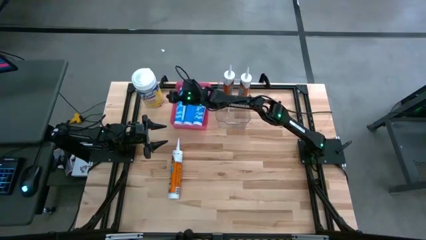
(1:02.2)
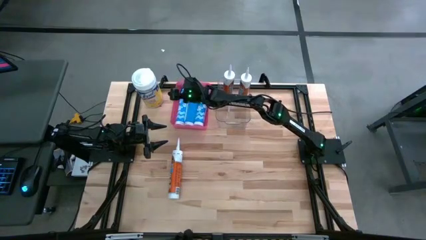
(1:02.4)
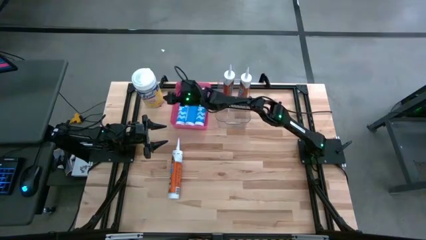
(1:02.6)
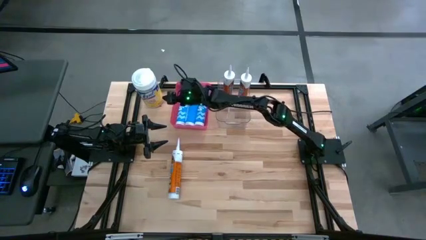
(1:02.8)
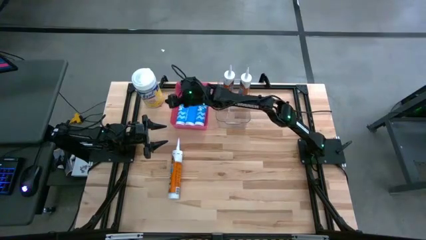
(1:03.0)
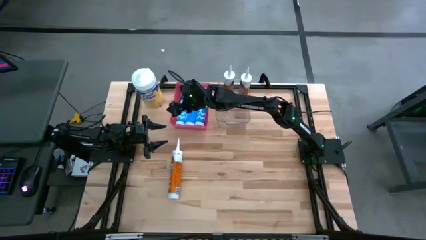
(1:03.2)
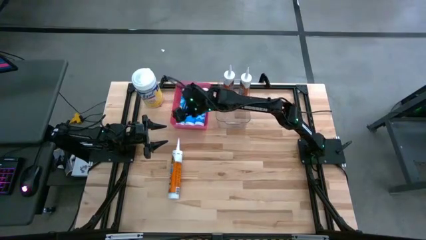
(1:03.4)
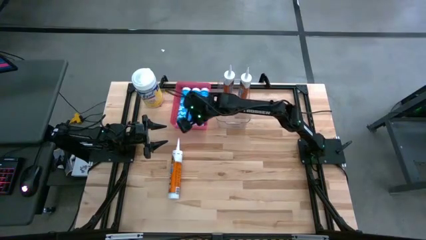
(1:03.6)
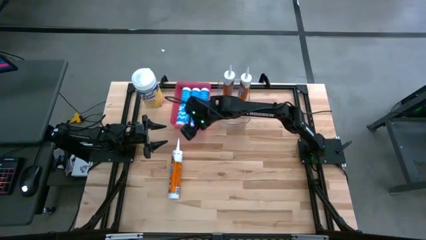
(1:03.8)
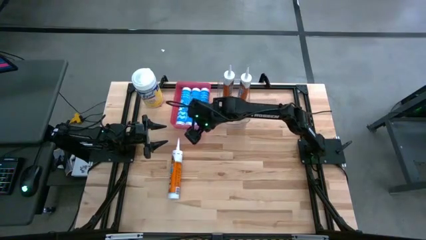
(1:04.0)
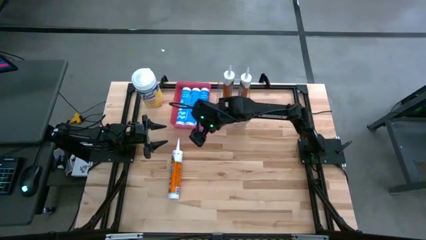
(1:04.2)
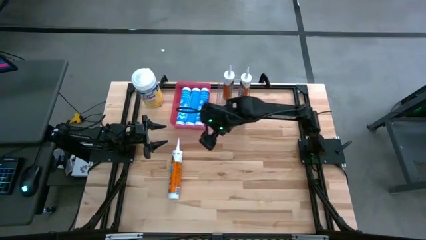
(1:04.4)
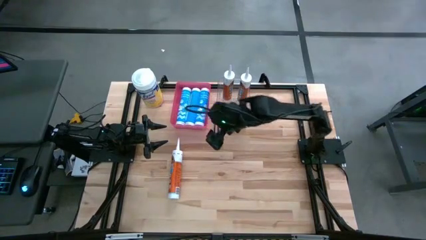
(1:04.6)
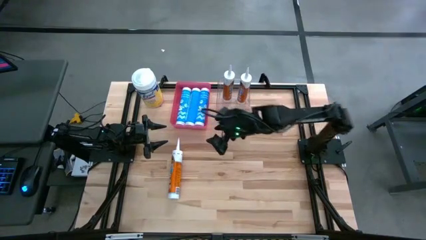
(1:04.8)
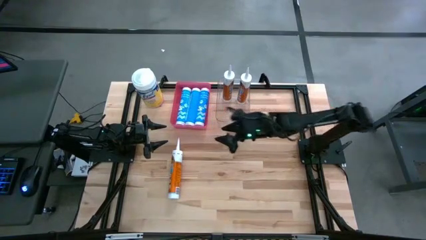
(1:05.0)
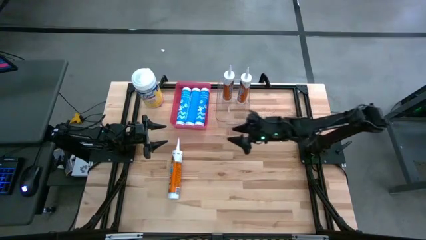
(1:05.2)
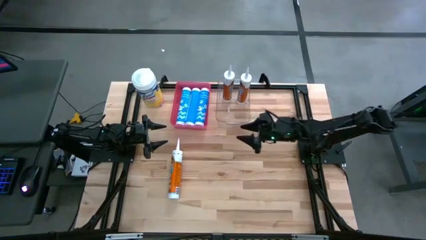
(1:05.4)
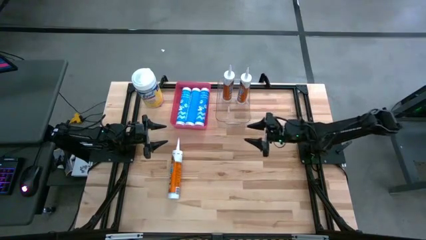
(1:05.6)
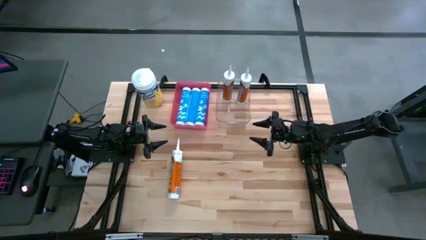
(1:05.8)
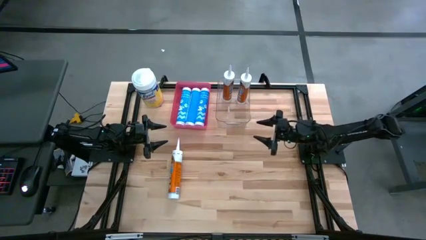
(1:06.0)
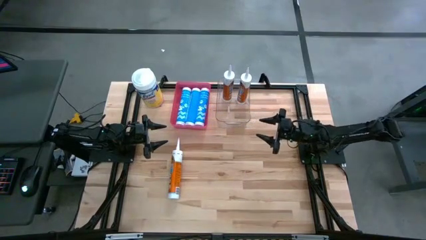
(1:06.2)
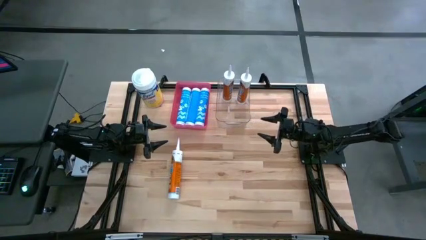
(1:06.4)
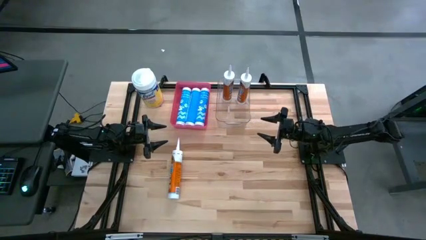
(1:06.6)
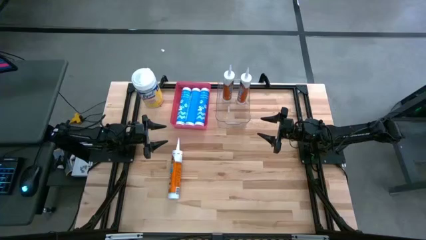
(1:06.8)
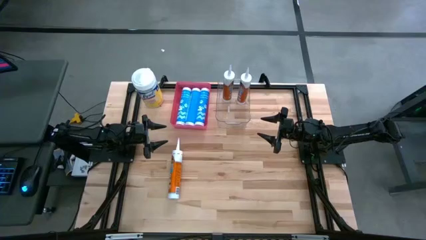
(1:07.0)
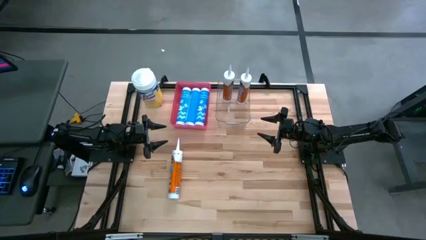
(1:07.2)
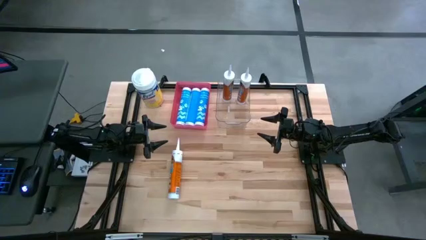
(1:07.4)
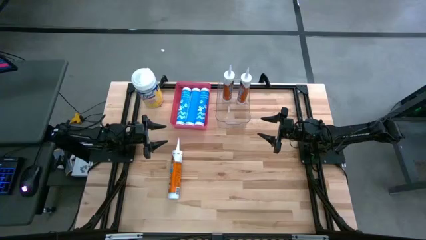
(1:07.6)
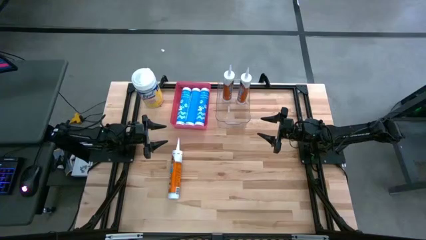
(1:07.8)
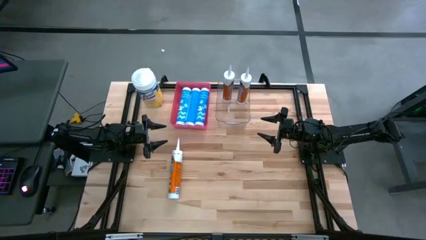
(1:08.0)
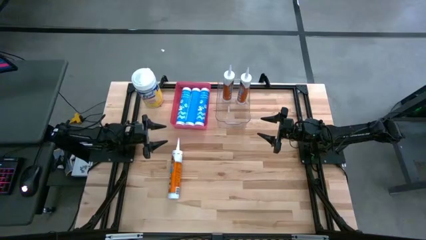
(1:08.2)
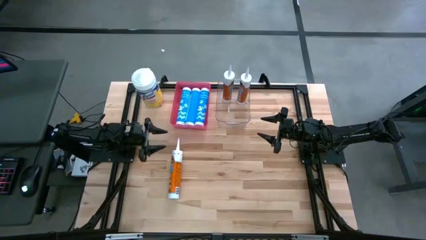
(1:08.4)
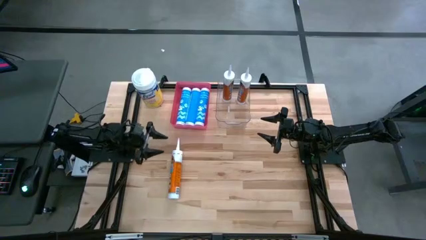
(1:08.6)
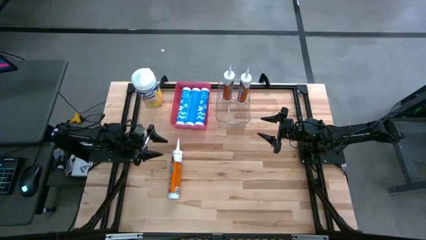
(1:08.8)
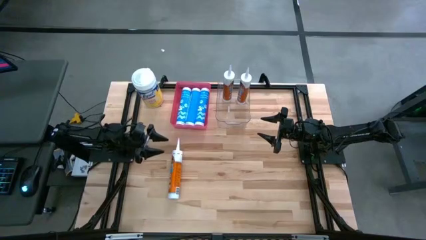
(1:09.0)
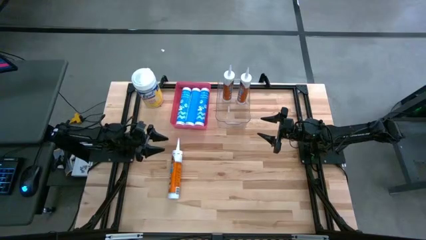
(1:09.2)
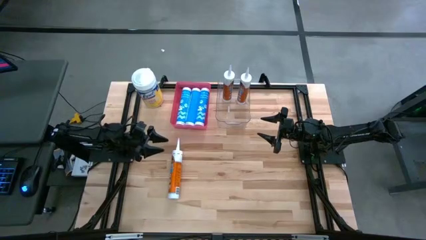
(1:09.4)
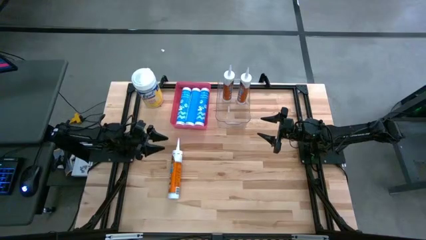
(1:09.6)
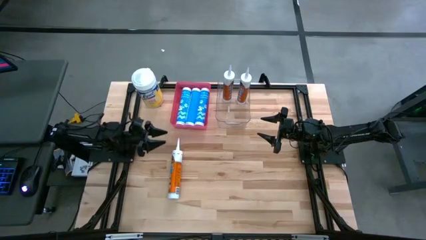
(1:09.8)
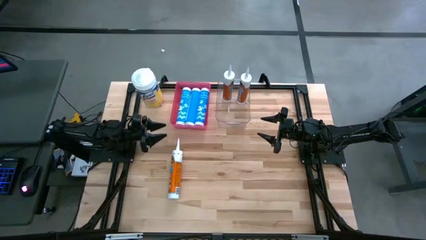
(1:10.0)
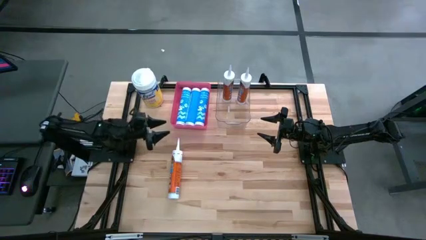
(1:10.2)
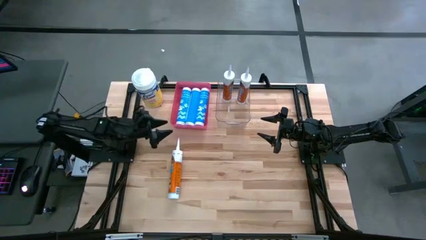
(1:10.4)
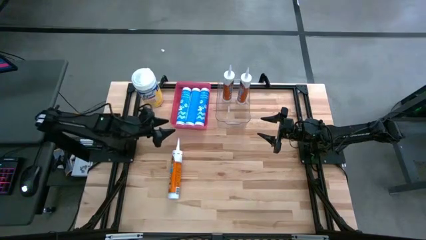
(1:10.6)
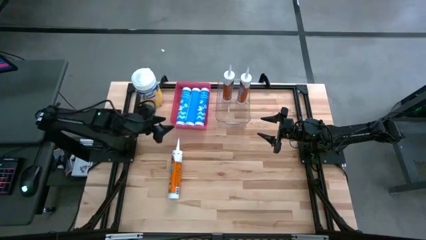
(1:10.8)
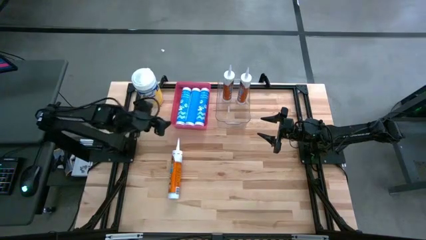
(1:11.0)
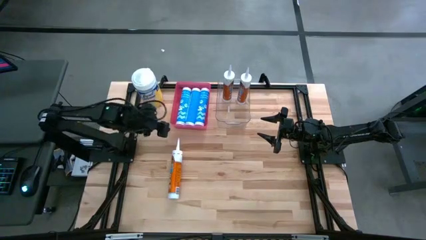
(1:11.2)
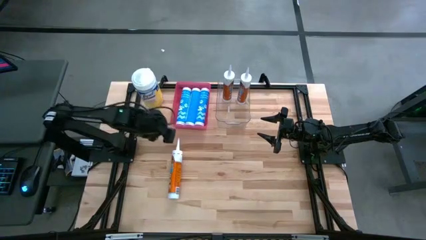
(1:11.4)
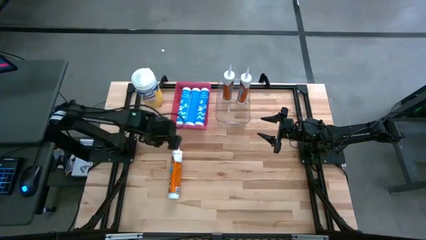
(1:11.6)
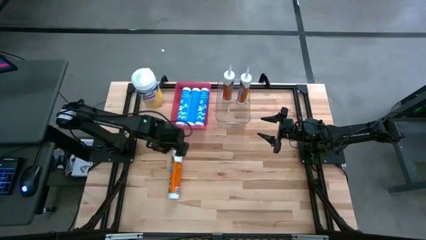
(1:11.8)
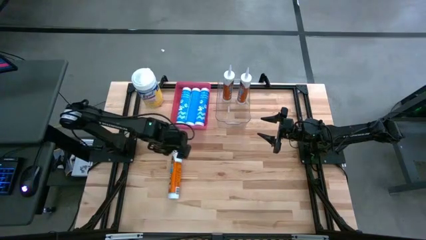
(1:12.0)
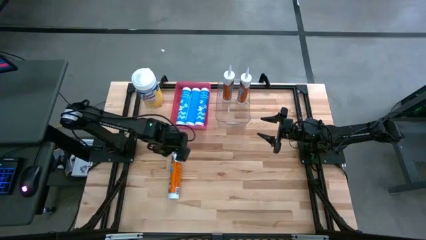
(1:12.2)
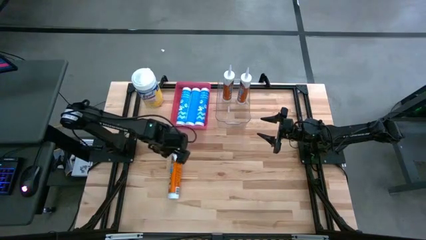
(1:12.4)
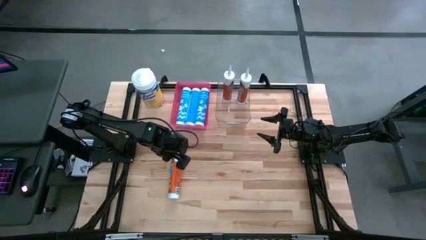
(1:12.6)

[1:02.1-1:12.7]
Task: Sort silicone sealant tubes
Put the orange silicone sealant into the transparent bin

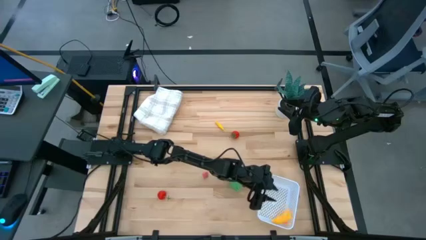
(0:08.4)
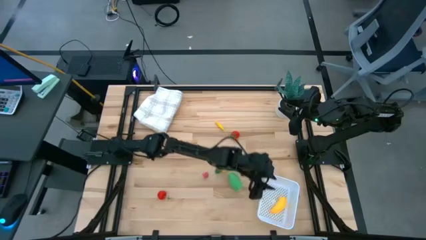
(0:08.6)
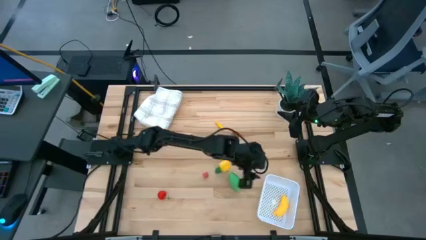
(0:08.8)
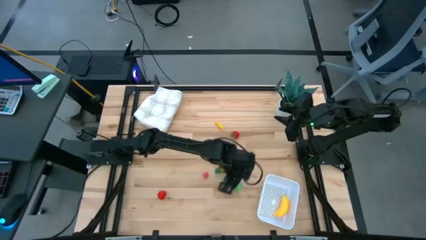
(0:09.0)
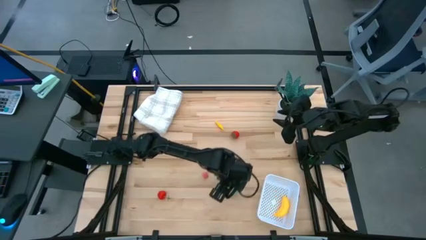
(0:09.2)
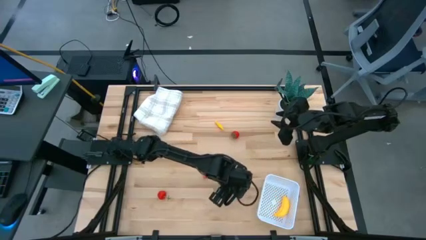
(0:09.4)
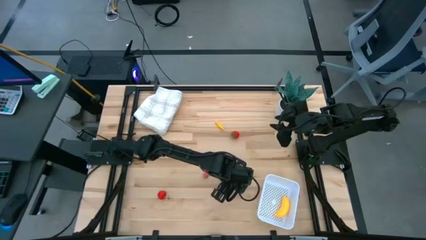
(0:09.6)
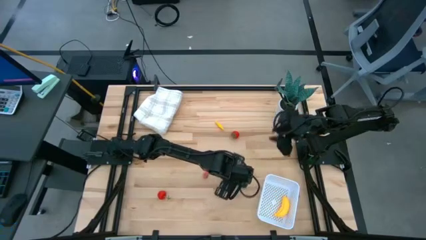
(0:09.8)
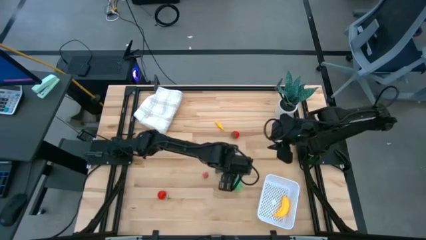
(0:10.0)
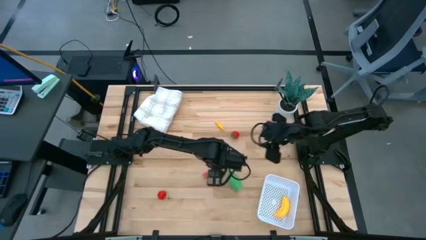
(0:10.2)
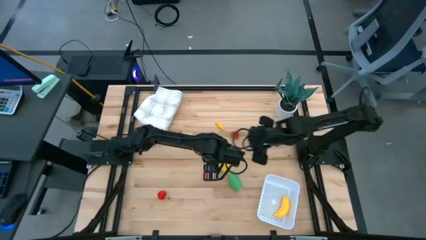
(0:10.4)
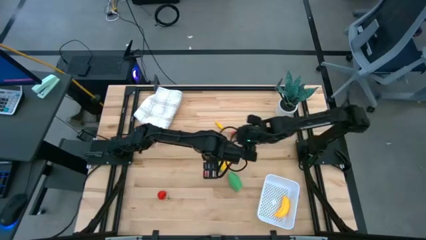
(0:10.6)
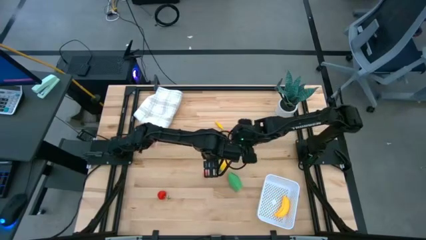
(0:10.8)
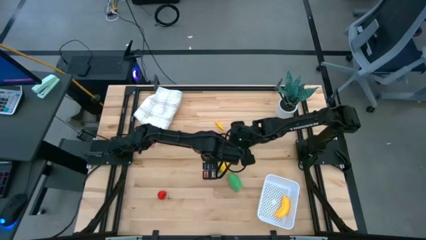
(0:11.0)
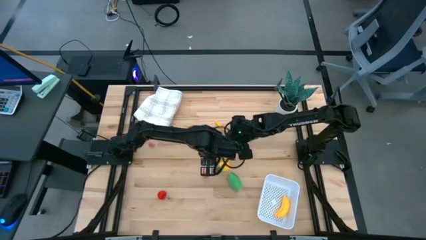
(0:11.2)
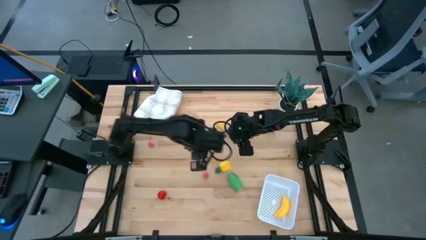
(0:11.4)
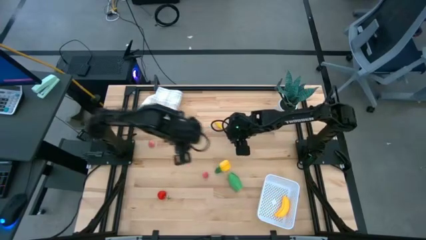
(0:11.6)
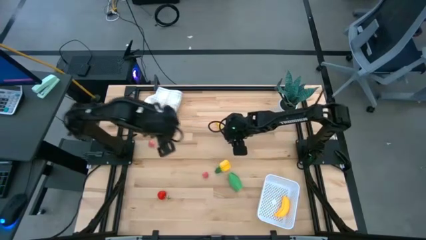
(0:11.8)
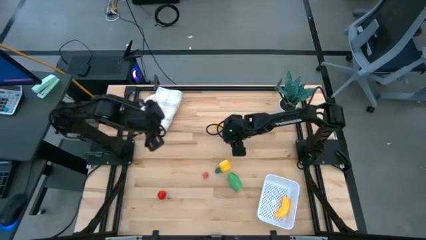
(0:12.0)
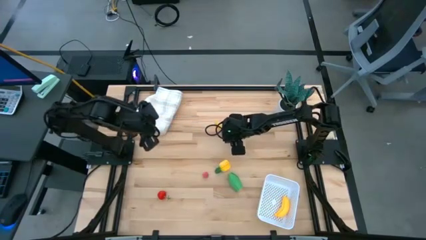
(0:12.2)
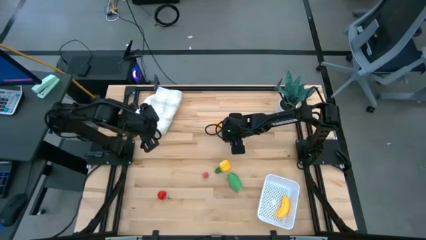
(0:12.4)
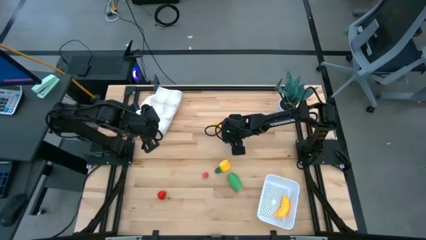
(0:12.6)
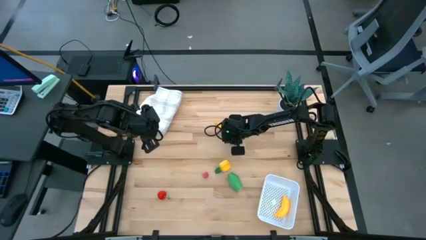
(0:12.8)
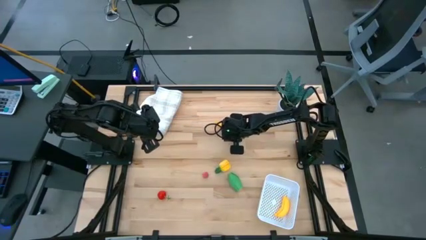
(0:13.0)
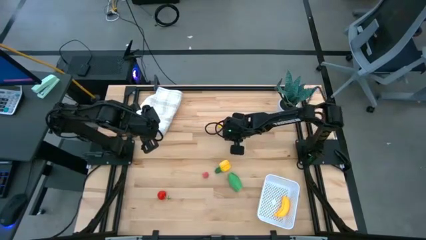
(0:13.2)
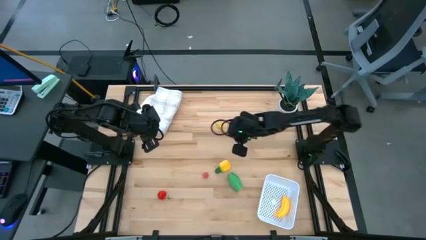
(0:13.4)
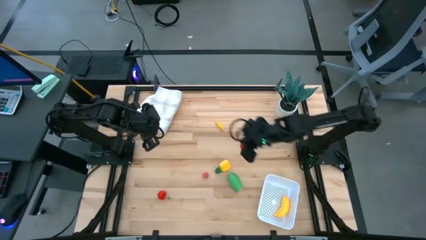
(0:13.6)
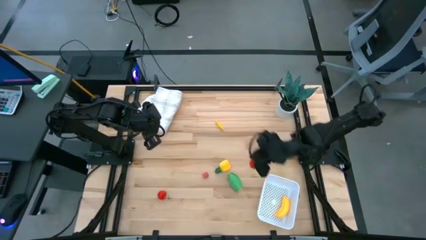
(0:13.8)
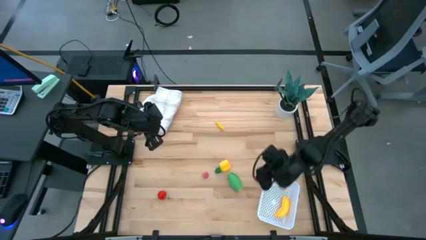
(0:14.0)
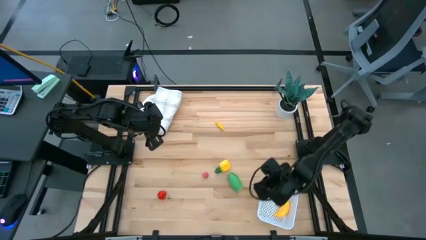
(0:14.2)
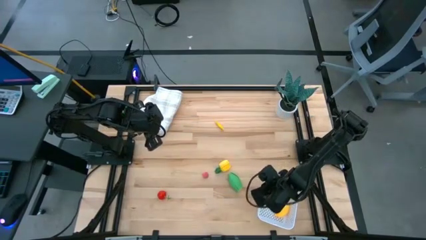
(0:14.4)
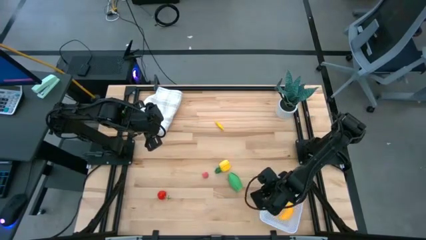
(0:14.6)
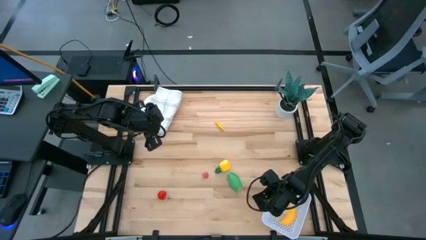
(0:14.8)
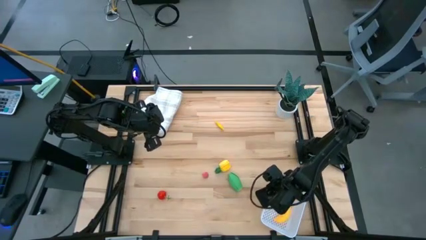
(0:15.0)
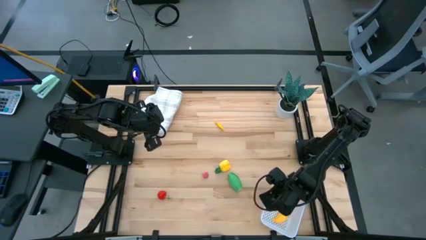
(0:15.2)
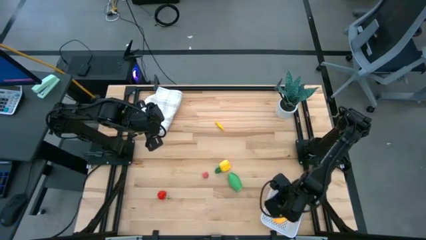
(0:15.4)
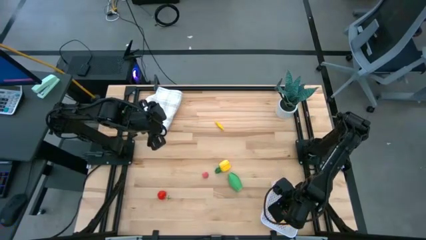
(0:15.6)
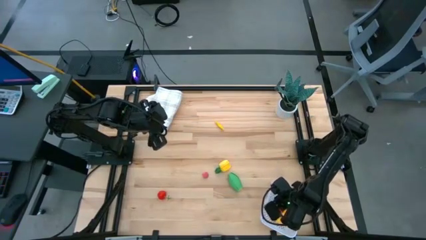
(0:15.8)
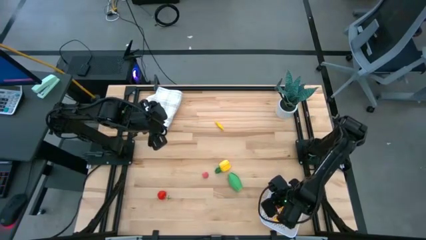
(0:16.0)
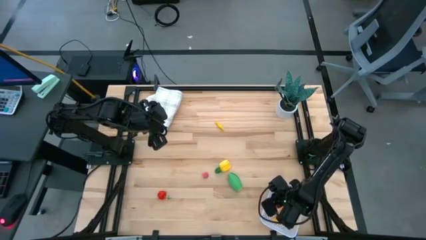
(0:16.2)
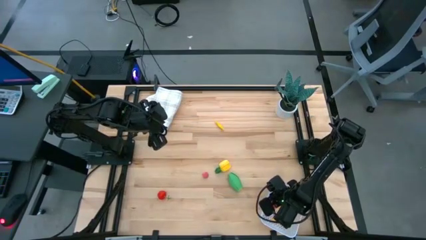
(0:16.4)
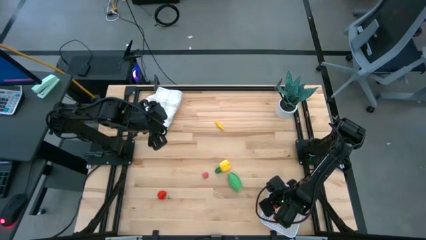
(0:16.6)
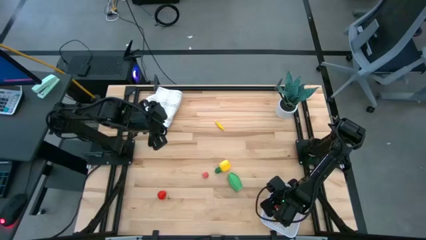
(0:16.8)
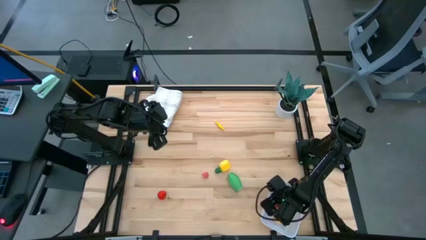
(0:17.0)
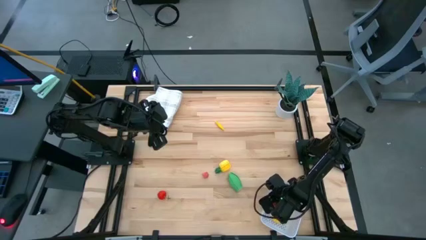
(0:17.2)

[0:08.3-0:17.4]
Task: Pick and placing Produce into tupperware
Put the top red strawberry into the white basket
